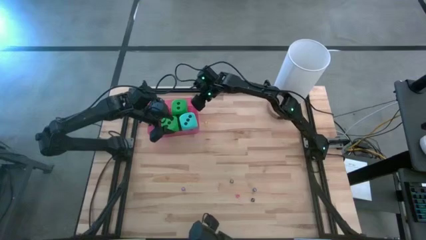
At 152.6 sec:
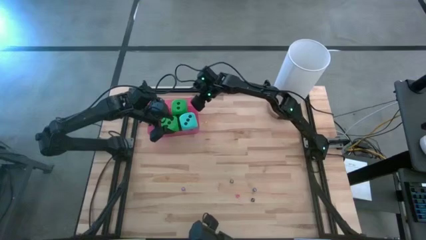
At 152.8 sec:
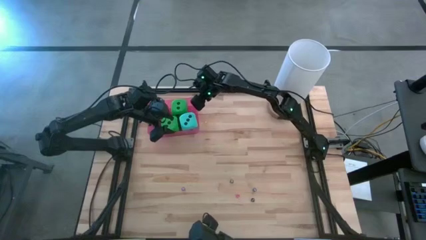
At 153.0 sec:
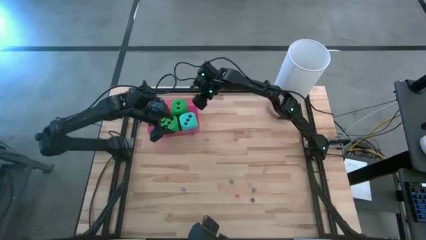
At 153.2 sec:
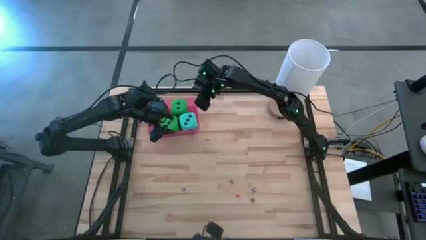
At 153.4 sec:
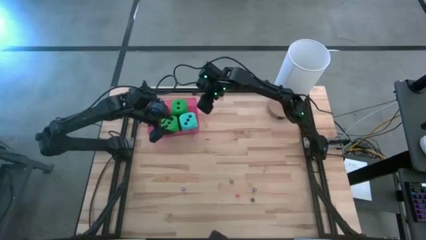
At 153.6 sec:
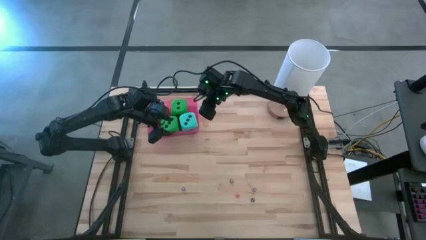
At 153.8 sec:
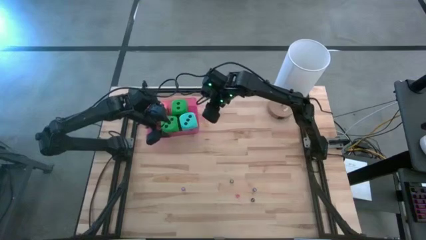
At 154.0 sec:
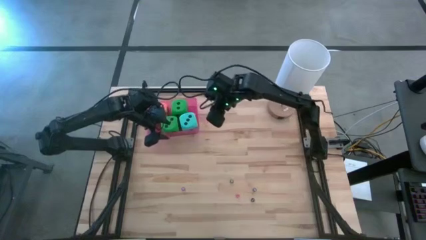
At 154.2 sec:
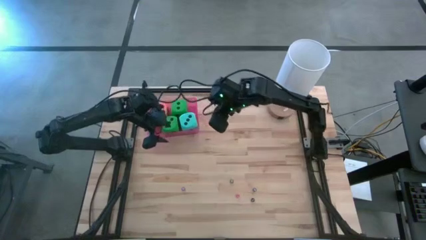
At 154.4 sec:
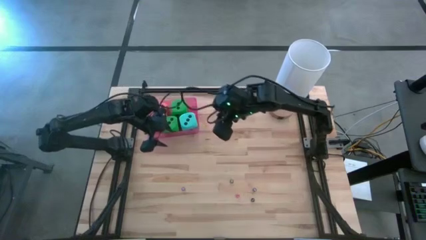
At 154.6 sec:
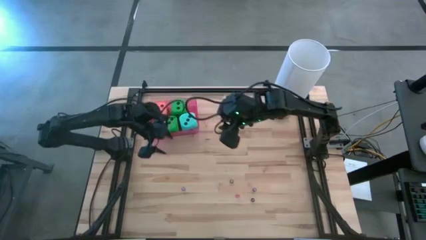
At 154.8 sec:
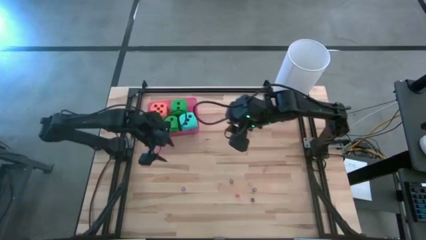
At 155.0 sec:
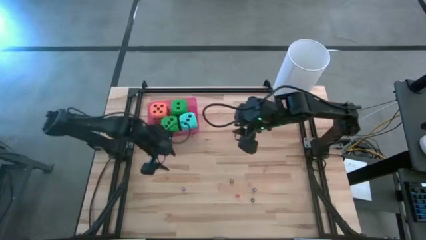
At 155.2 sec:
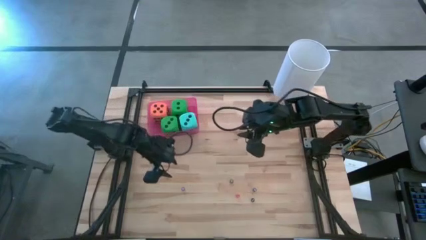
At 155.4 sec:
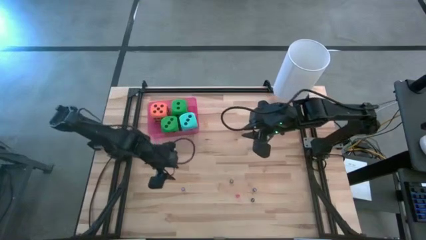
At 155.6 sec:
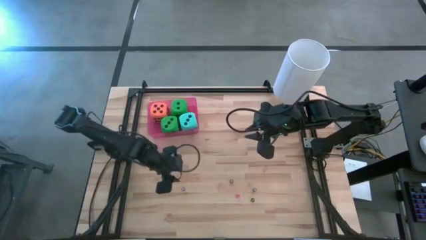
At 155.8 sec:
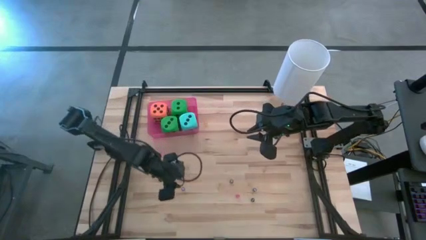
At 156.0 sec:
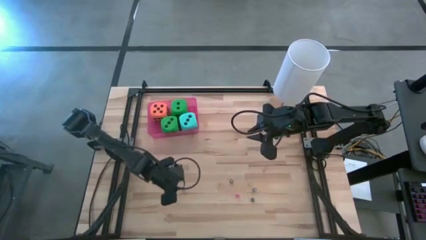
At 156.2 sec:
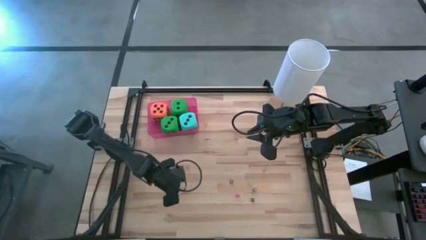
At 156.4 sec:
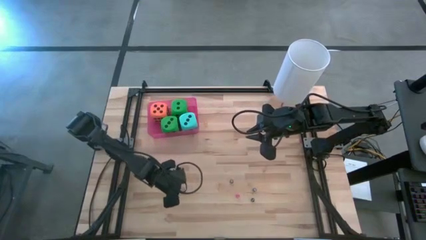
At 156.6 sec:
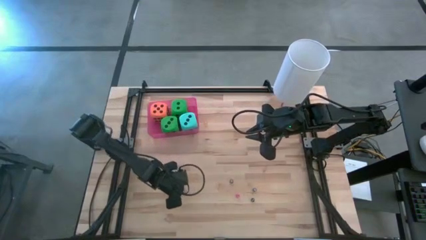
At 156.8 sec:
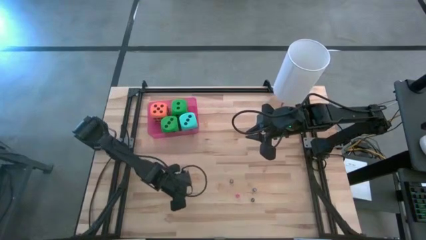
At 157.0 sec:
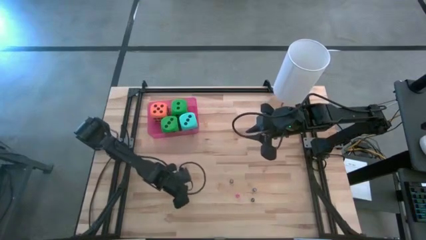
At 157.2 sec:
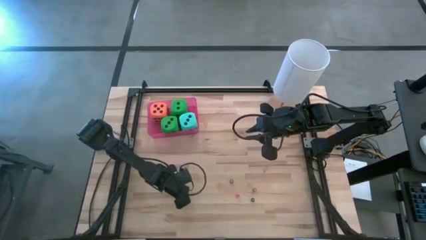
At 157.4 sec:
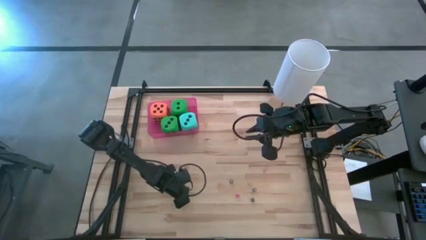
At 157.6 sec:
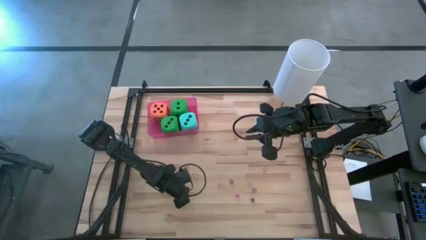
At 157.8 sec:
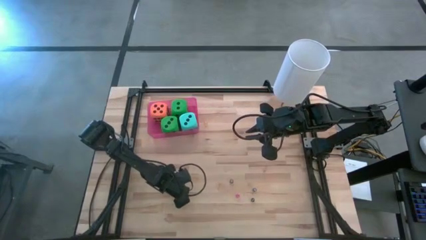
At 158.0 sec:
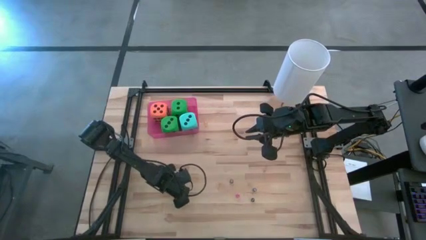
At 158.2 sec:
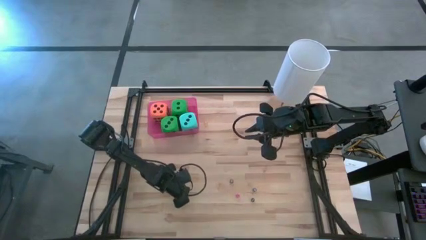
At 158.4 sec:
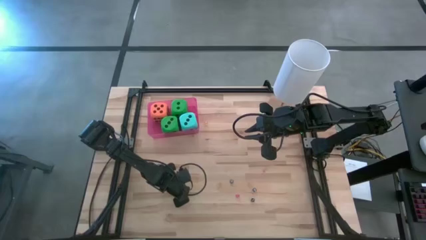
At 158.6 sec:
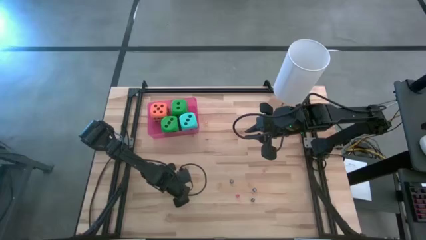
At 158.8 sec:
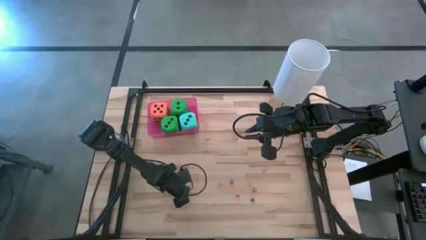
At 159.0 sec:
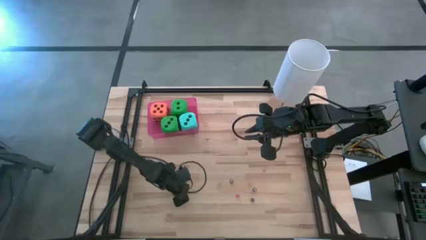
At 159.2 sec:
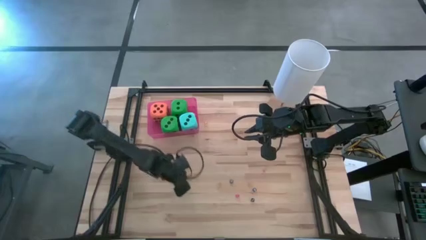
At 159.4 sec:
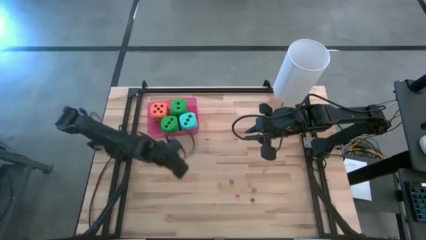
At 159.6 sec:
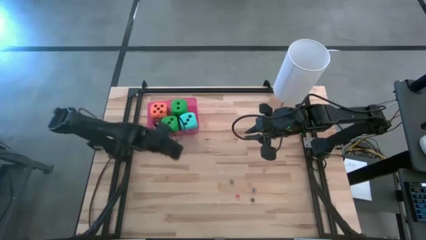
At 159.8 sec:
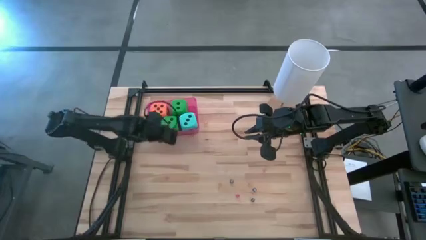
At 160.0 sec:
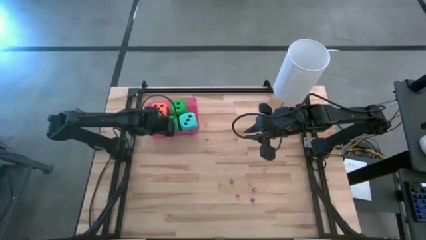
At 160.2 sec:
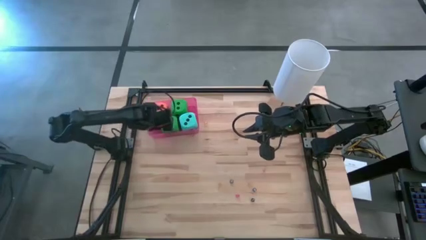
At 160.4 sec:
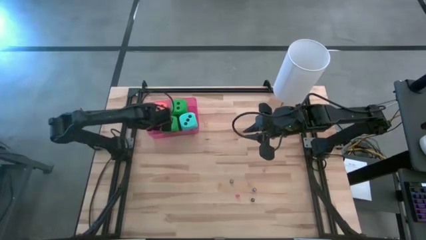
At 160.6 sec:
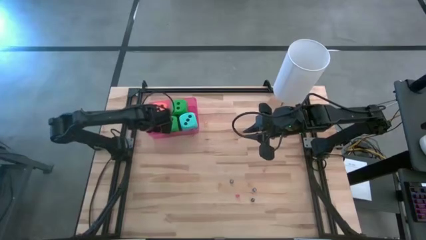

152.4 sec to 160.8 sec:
Task: Pick & Place Dice
Put the small purple dice into the red bin

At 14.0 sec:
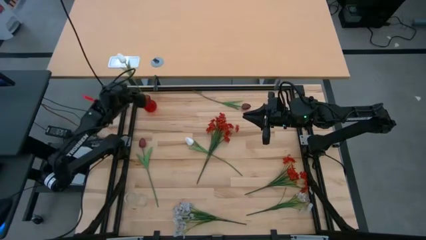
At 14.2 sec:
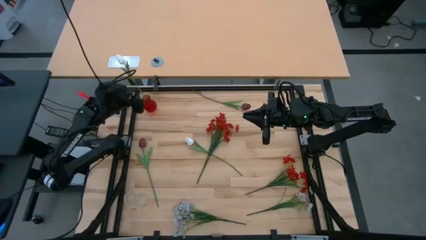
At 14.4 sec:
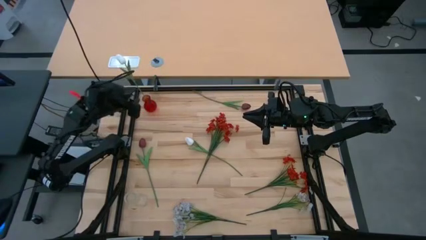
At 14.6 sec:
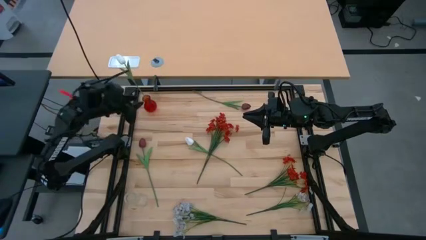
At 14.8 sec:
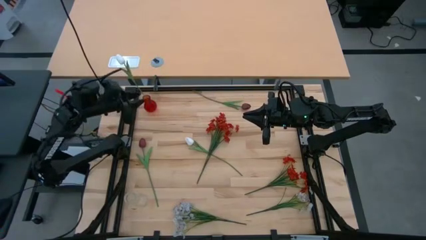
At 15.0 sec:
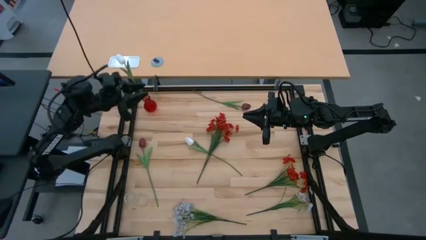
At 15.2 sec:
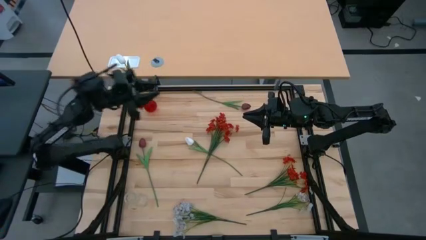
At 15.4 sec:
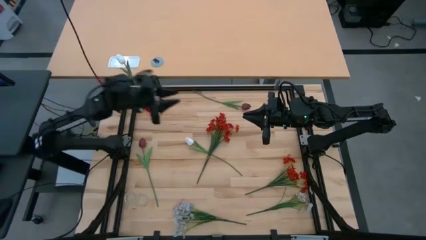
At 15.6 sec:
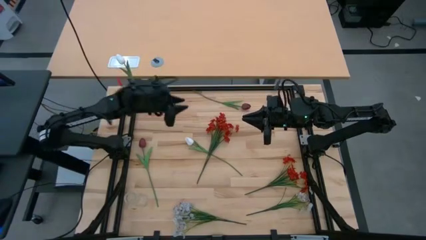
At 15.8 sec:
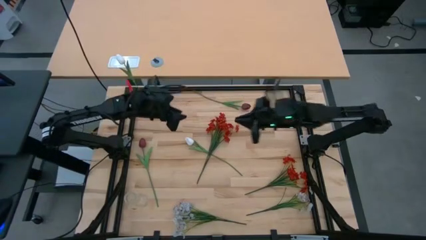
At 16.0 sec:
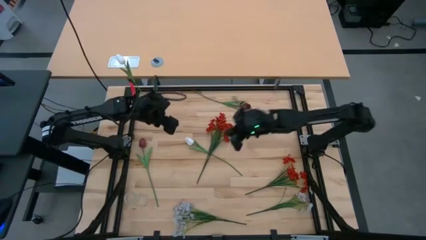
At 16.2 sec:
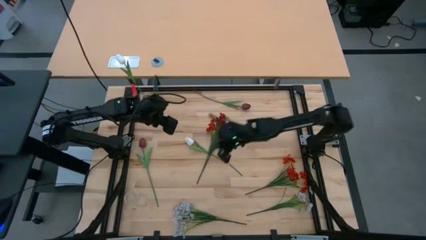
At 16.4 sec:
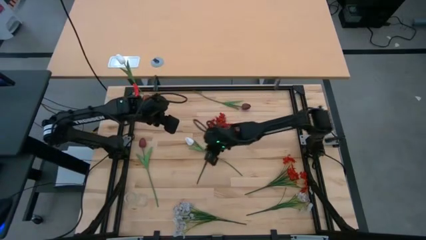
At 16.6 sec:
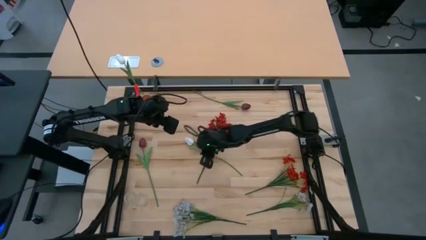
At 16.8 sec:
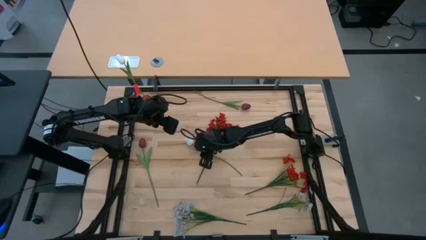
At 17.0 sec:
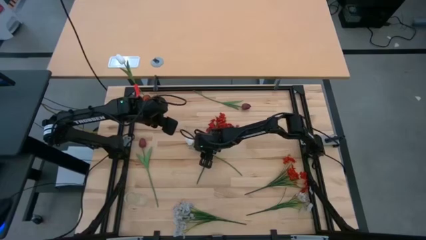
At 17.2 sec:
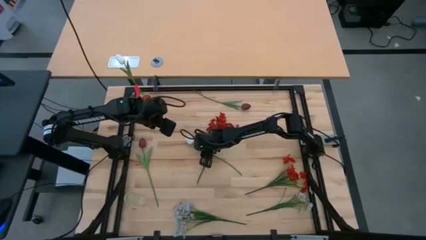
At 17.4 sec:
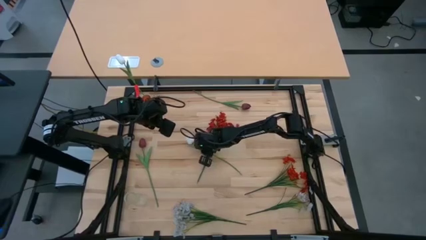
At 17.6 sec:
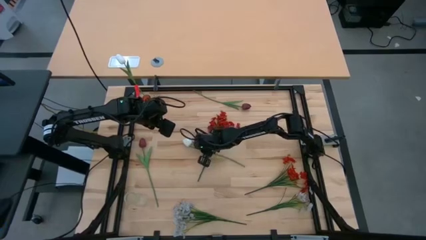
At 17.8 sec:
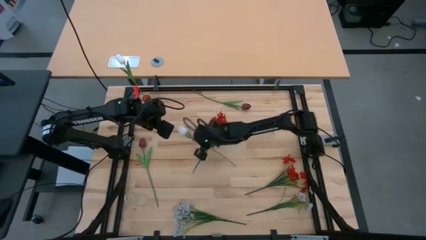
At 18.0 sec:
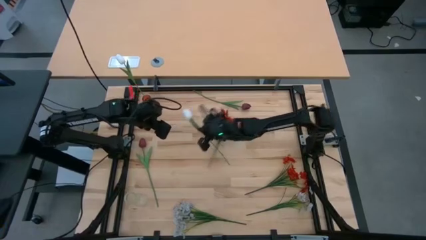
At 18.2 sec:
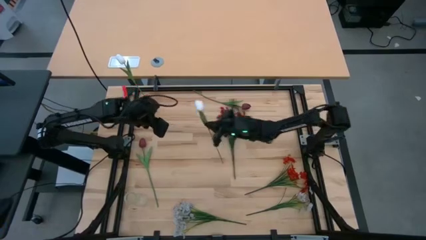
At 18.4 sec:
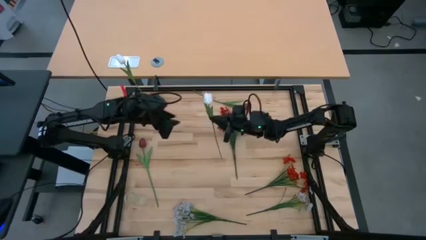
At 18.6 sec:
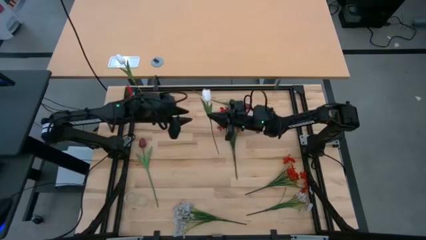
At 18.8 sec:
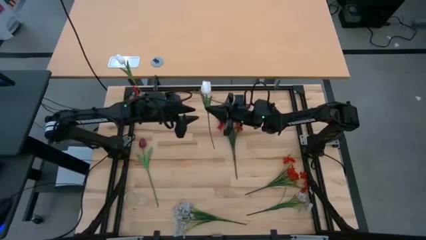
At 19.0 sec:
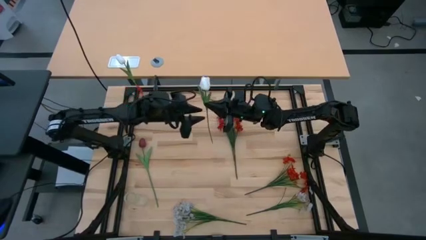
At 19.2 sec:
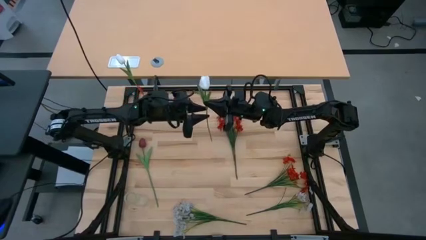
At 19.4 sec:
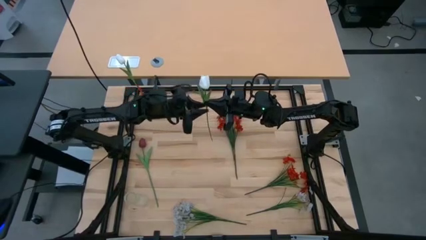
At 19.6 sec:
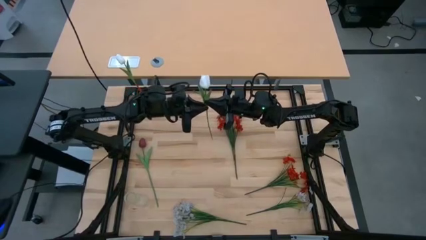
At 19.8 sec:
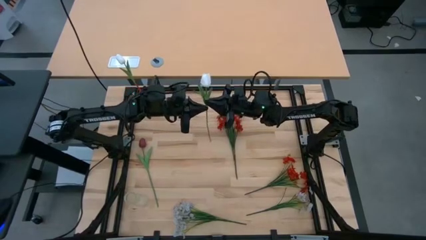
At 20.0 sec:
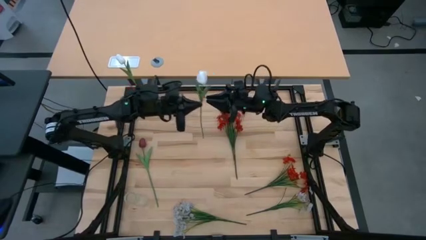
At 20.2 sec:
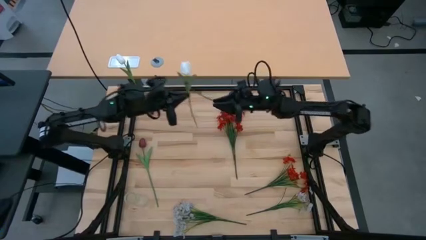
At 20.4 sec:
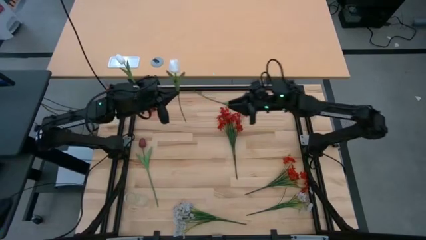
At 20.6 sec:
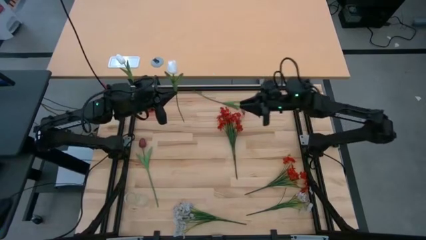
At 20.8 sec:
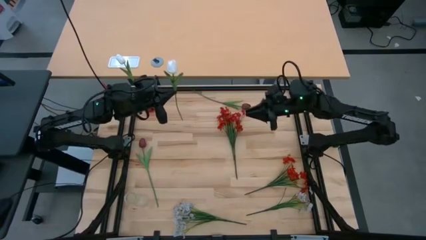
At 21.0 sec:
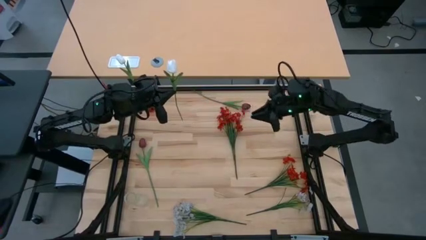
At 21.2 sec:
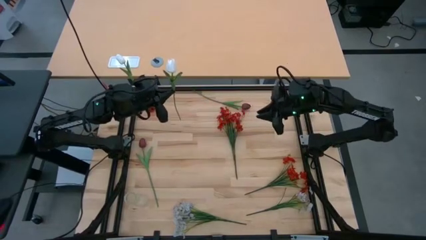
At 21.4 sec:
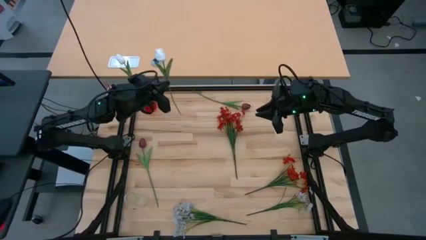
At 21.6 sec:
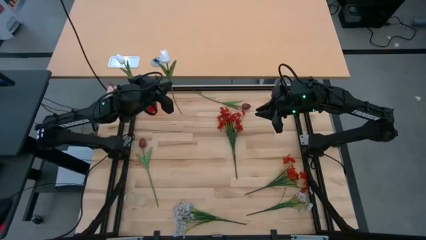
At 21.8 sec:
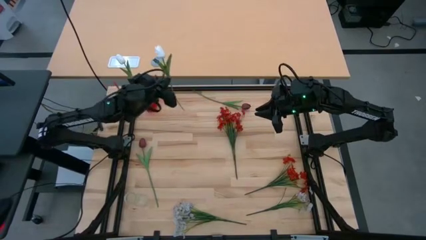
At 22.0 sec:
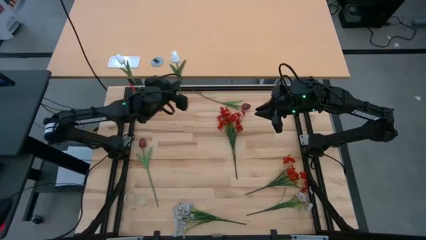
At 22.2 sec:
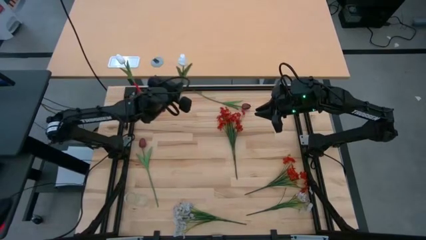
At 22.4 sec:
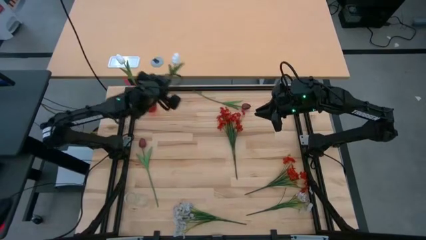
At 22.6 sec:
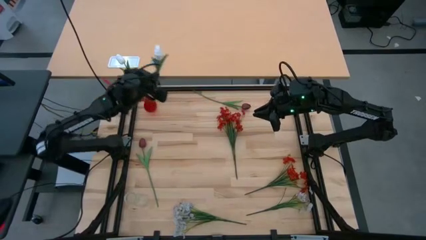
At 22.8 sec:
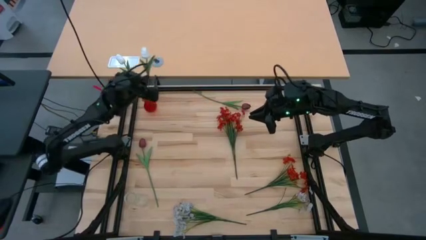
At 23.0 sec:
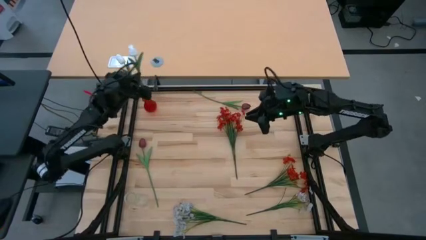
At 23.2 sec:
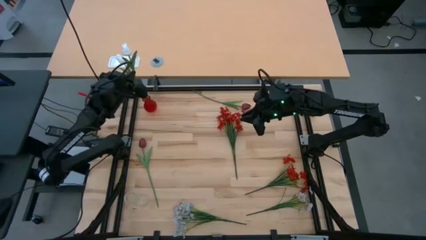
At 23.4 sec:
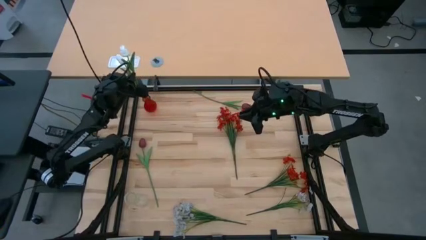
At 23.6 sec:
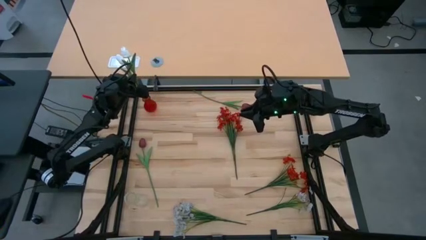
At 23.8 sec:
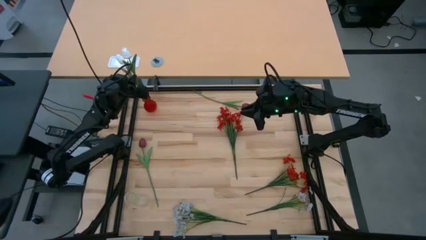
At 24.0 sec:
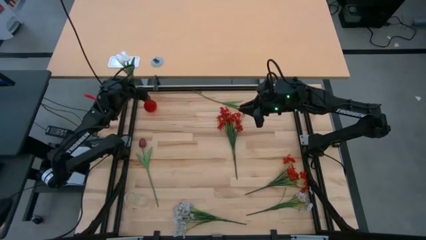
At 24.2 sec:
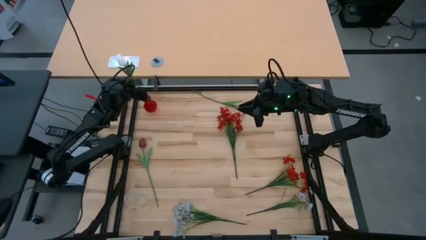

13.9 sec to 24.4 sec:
Task: Sort flowers into vase by color
Put the white tulip into the red vase
